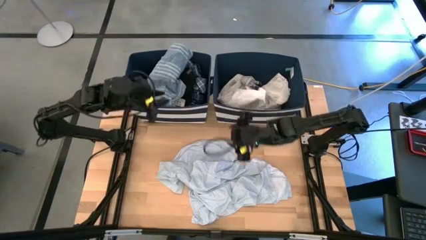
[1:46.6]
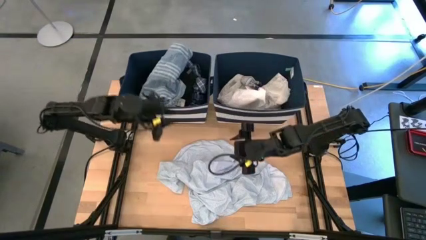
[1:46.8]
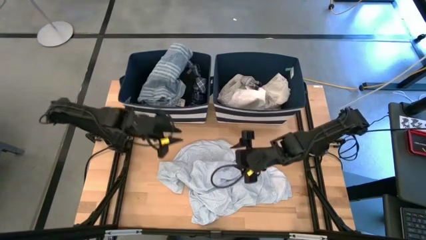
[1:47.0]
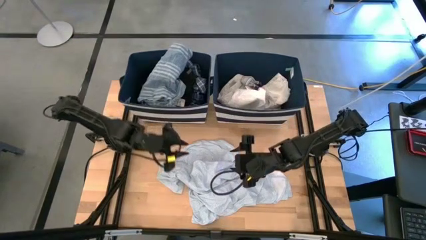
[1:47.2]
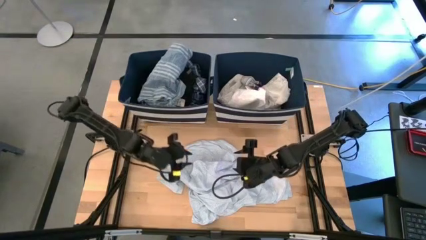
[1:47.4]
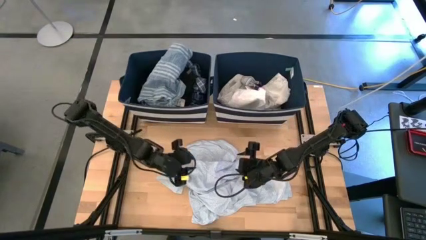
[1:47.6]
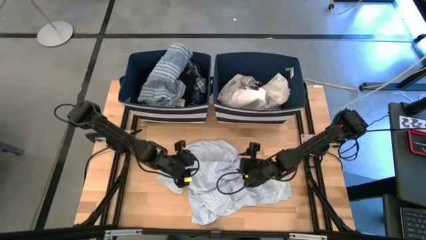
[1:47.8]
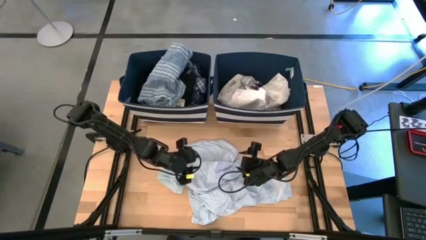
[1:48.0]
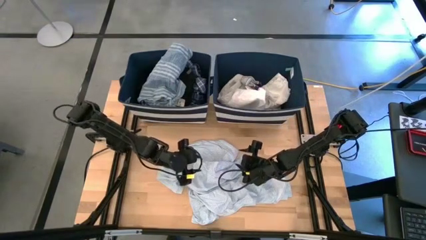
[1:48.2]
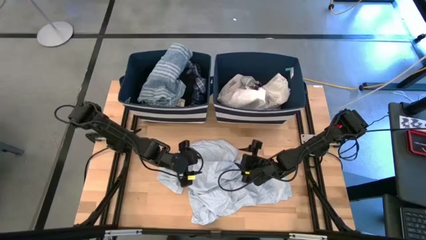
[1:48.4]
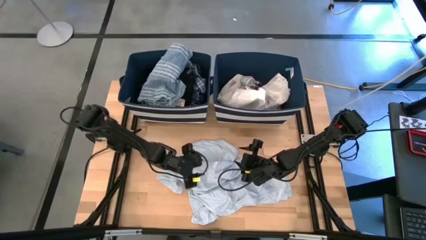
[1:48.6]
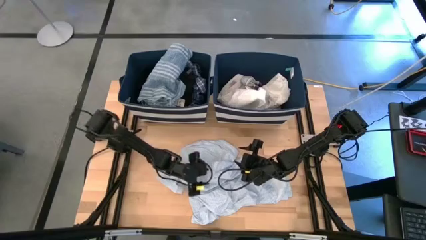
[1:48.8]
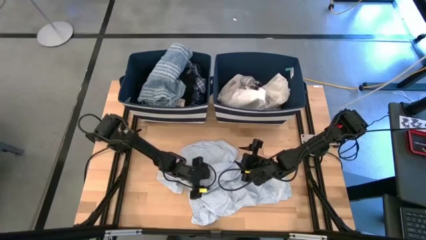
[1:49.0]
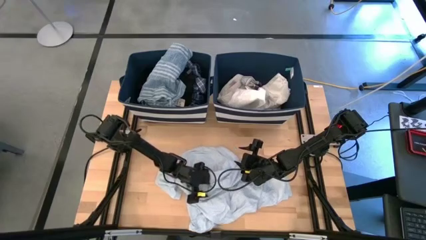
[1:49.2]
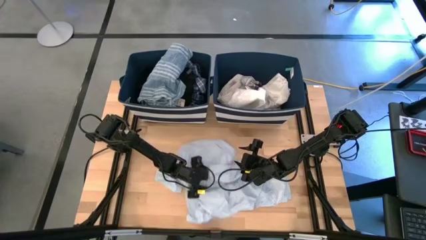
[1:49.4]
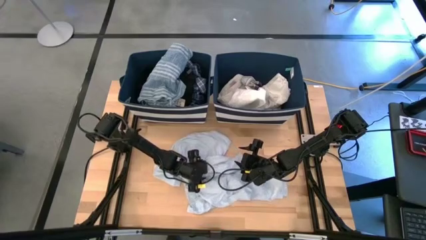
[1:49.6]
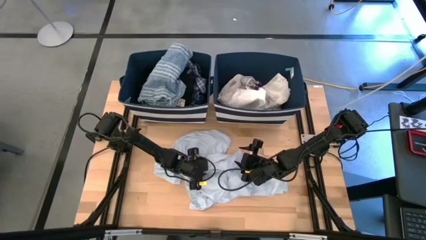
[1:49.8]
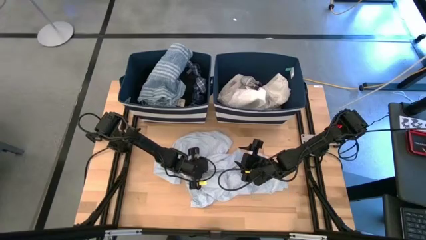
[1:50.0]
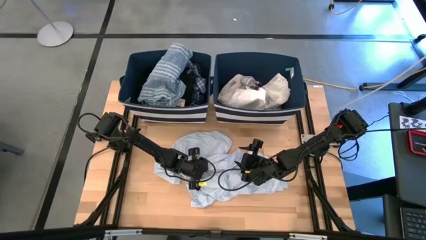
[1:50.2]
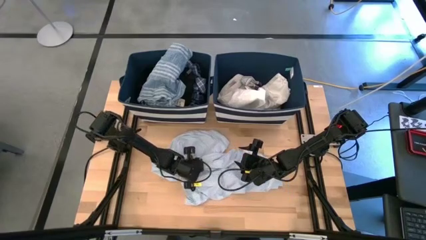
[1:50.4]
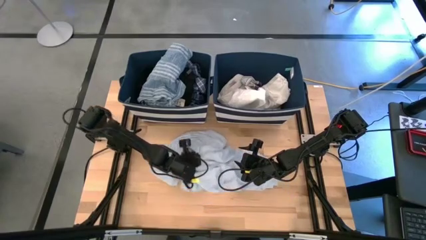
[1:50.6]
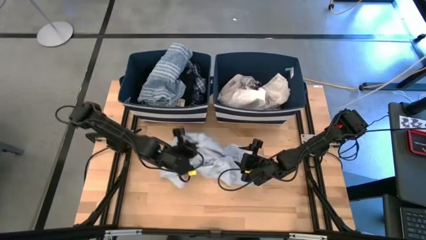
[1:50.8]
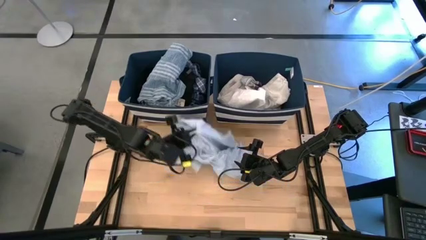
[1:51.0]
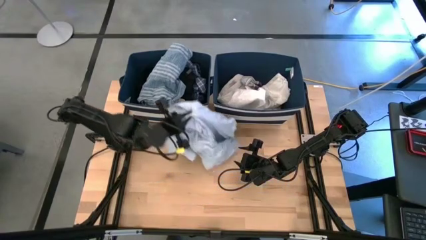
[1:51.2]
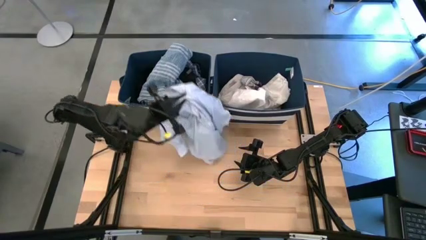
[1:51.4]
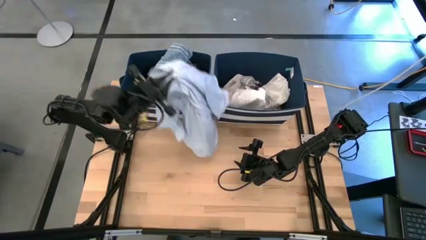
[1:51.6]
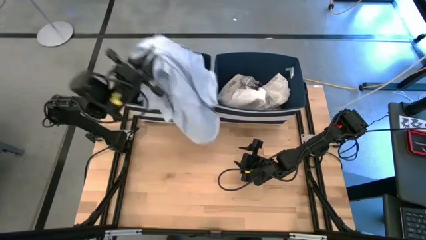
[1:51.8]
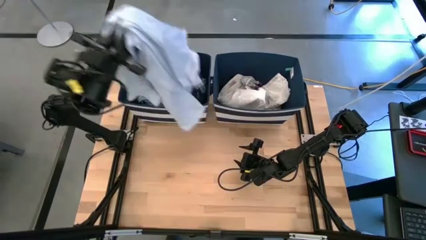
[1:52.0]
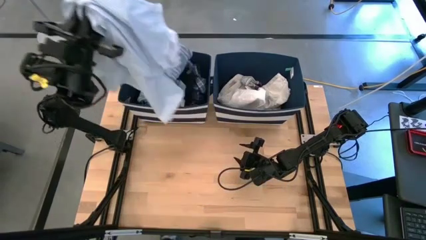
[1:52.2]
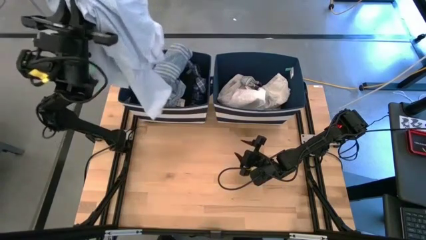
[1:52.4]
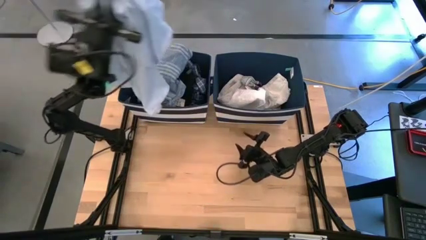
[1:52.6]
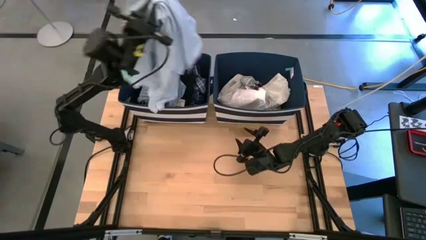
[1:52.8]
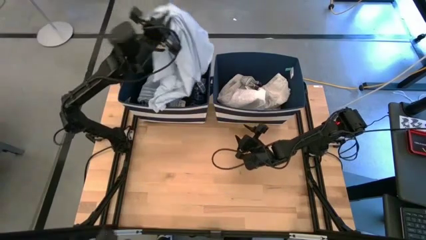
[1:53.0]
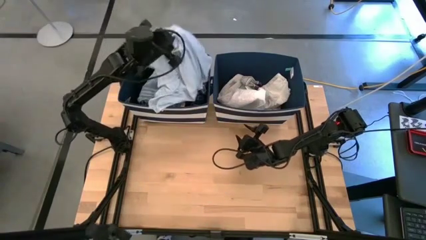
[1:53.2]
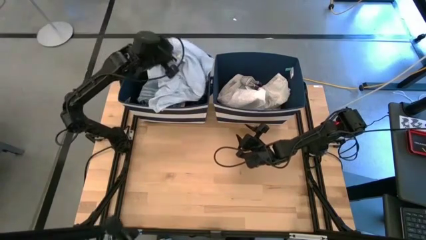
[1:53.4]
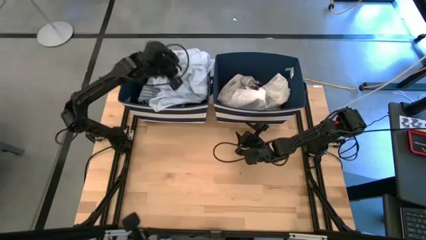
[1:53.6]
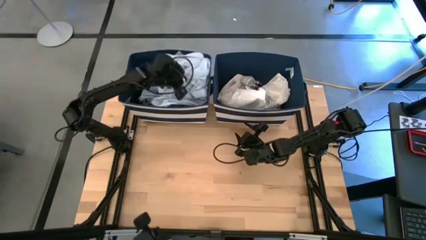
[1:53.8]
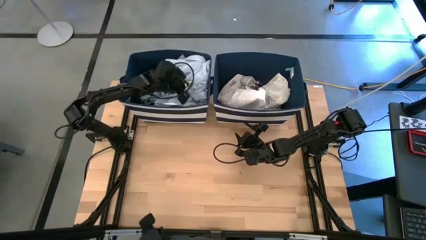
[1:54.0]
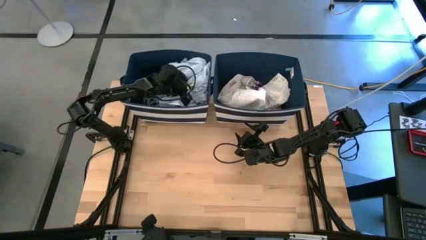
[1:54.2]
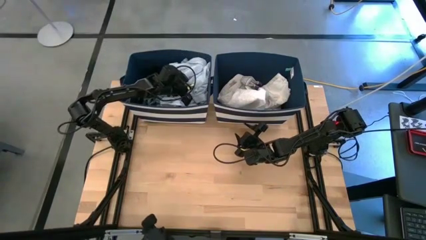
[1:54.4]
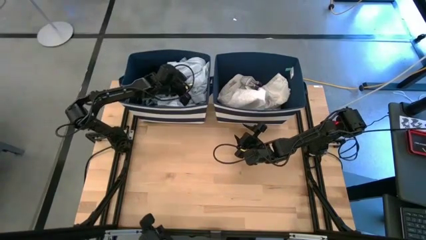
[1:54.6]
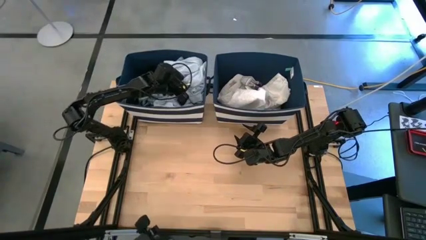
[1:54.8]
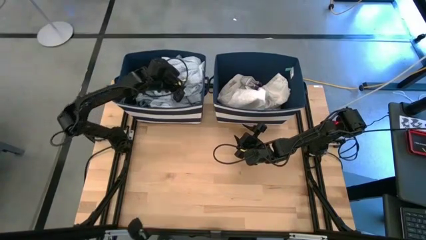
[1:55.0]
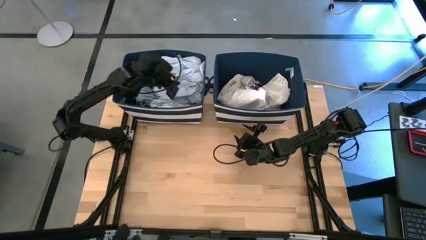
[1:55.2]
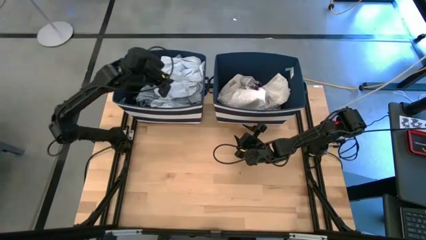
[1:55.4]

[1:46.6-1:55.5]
Task: Sort clothes
Put the white polo shirt into the left blue laundry bin

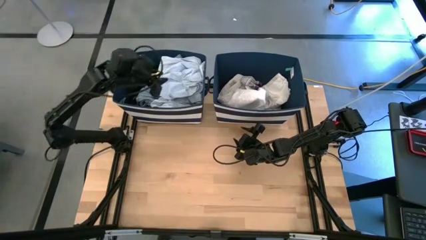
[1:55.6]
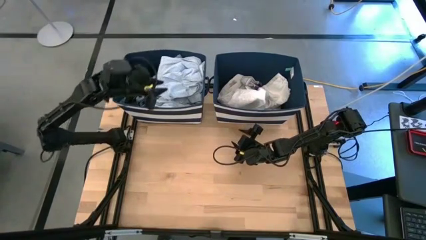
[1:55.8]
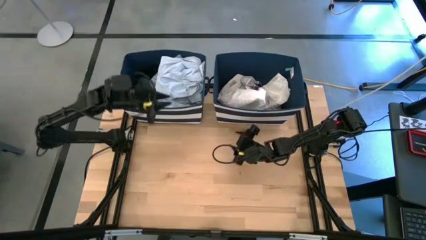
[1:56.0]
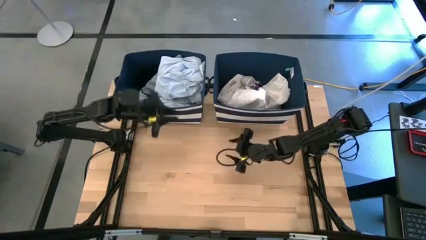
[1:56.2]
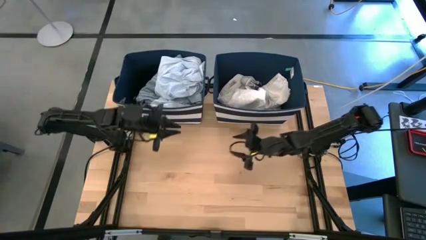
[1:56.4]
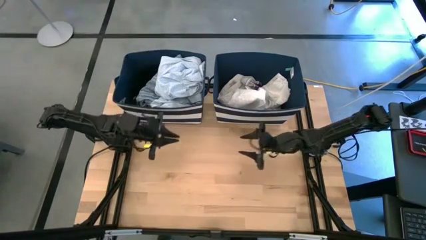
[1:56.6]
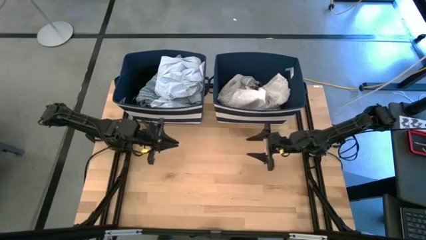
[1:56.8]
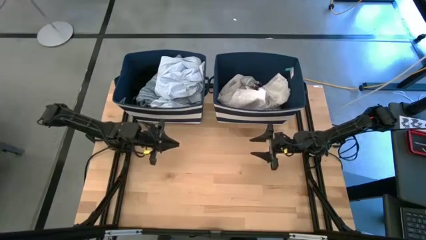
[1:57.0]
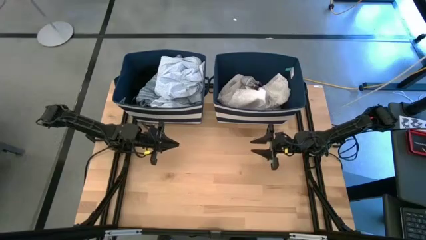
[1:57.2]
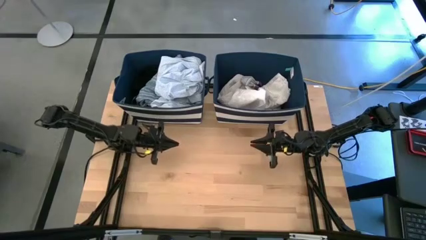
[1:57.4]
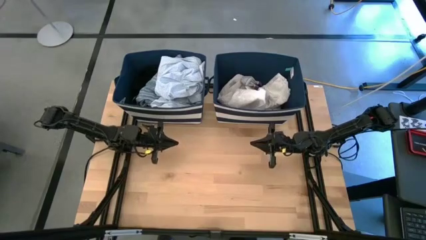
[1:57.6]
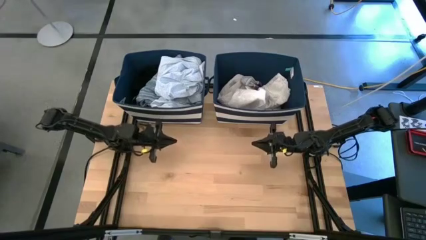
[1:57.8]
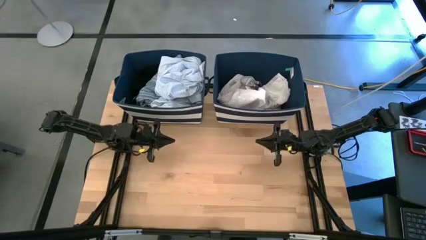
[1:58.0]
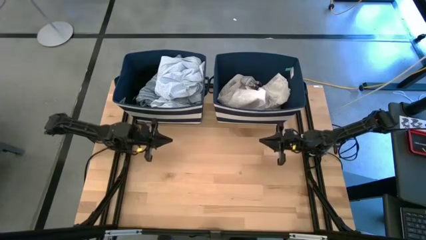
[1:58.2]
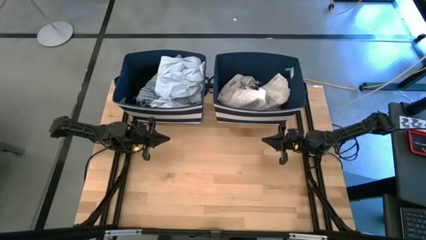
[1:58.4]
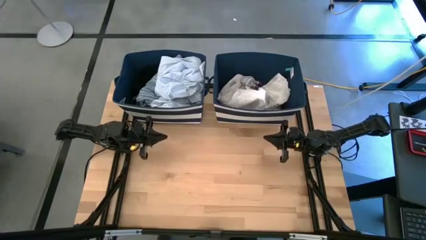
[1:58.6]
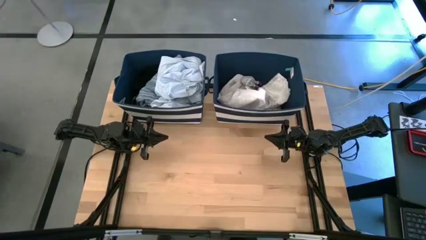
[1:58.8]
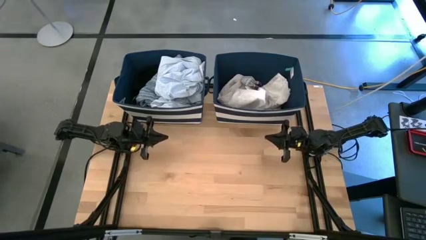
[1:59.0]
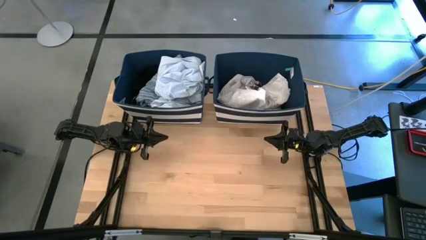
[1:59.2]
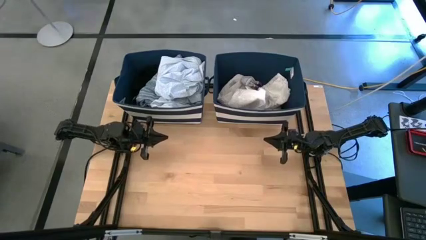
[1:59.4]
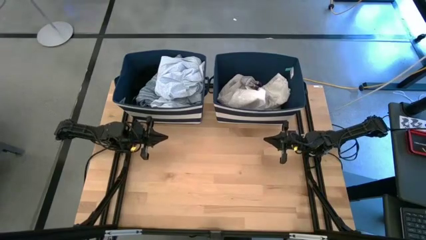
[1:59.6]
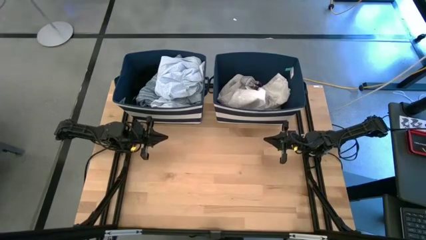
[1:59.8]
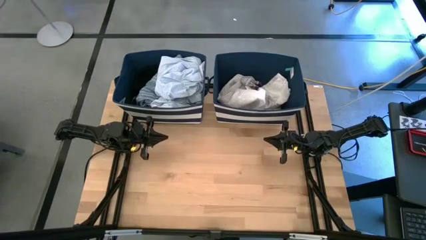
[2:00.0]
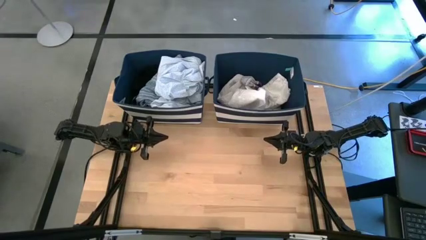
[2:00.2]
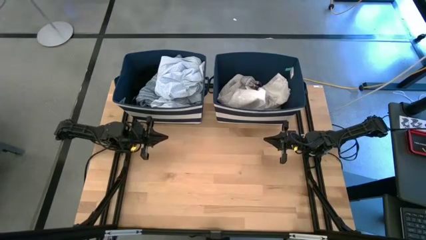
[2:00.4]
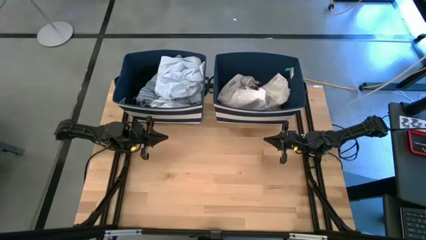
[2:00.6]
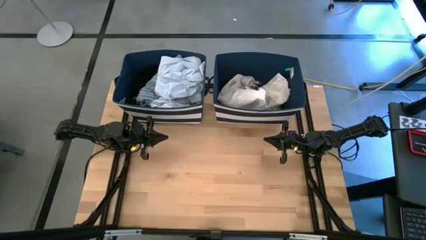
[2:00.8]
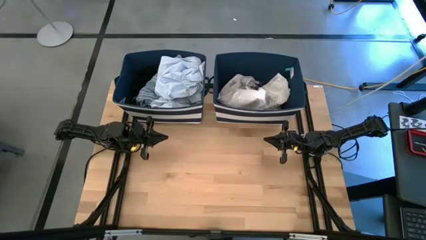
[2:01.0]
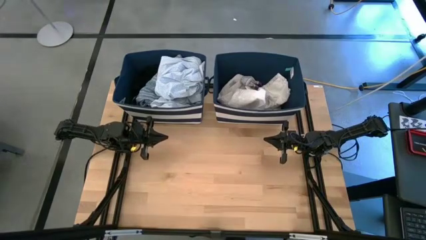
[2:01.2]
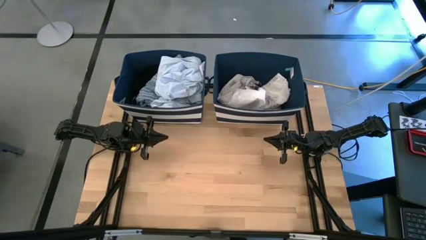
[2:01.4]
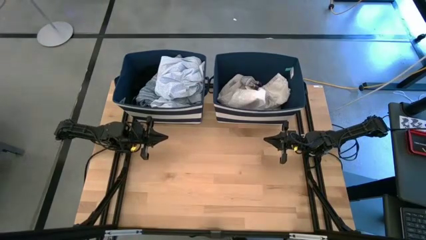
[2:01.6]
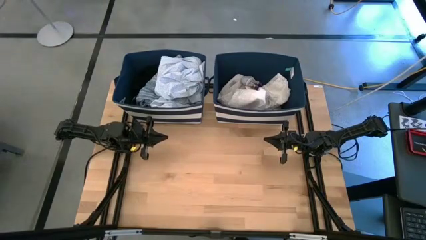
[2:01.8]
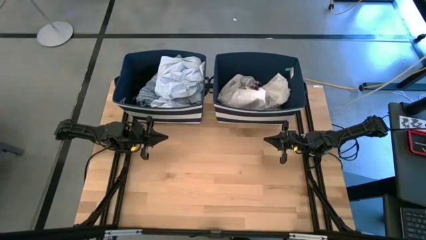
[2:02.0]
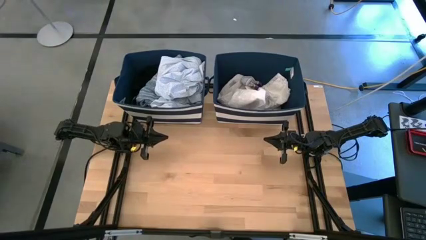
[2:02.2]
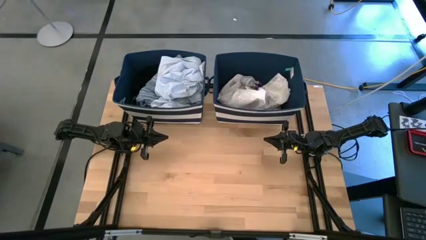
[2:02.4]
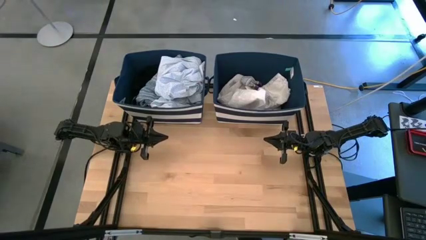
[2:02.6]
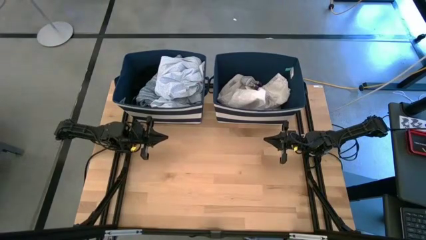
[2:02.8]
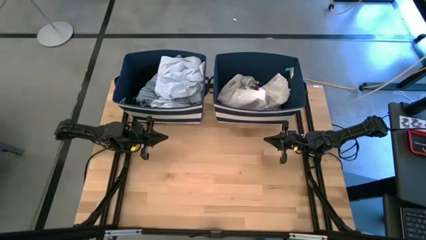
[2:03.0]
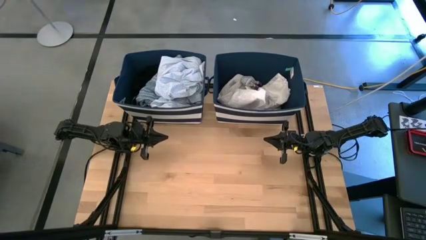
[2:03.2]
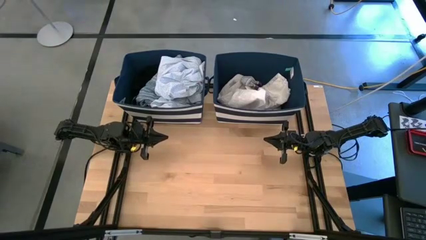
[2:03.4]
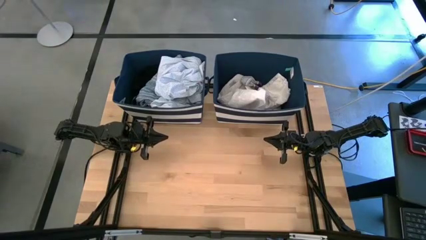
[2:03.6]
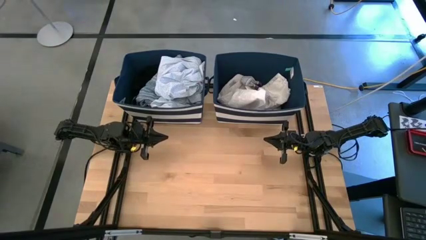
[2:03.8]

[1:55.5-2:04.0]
Return to Home Position
